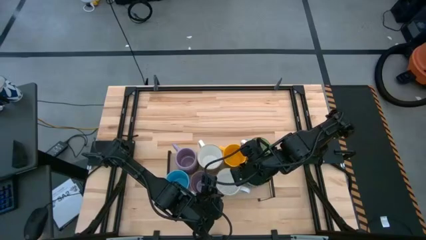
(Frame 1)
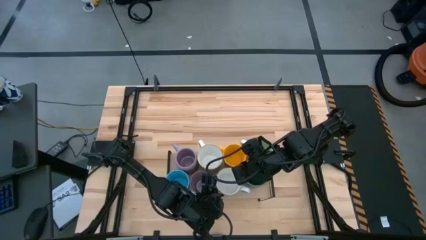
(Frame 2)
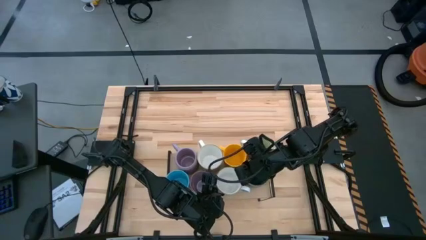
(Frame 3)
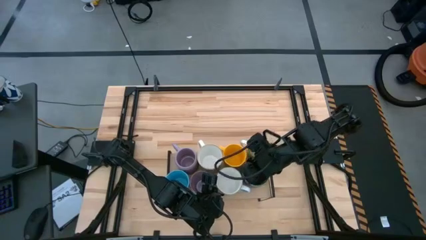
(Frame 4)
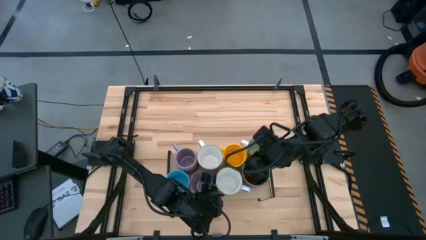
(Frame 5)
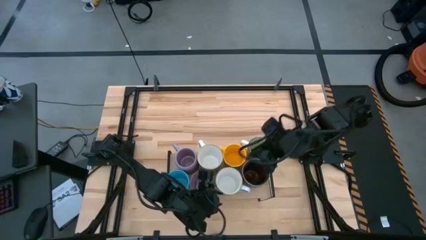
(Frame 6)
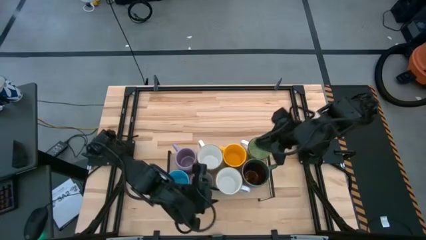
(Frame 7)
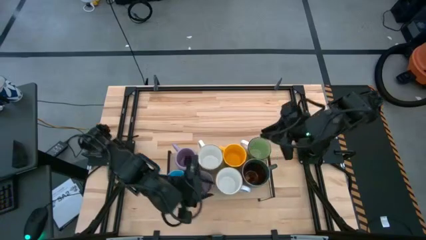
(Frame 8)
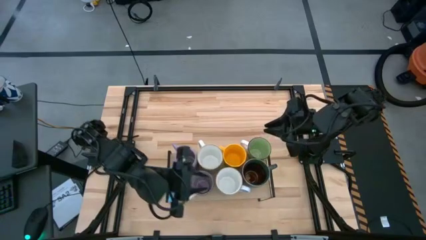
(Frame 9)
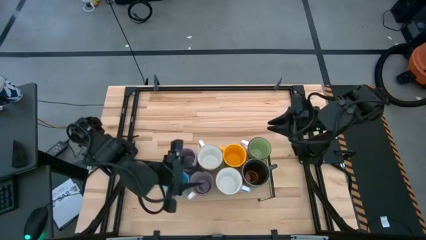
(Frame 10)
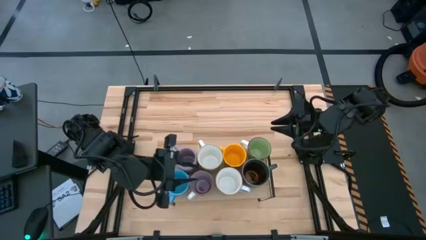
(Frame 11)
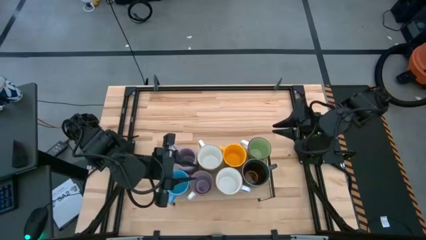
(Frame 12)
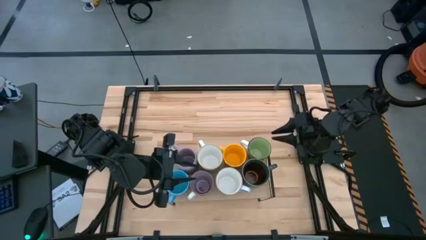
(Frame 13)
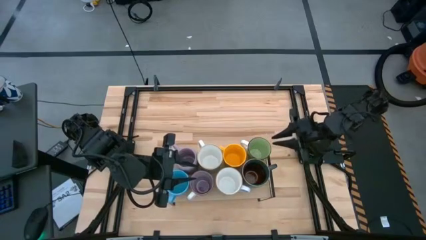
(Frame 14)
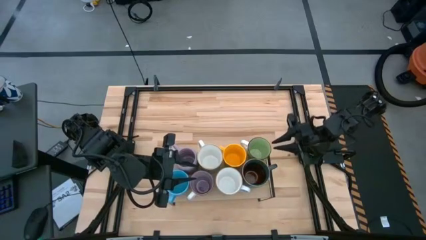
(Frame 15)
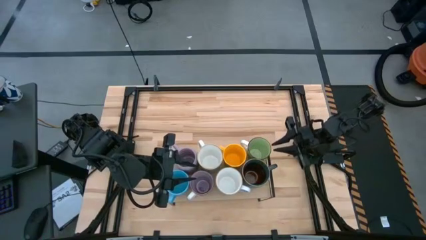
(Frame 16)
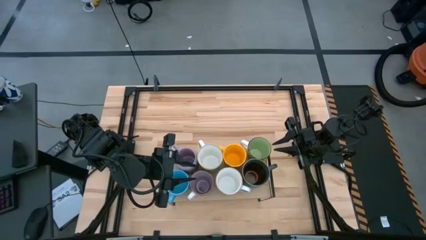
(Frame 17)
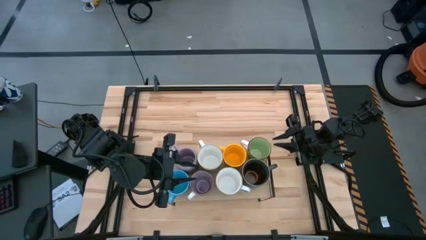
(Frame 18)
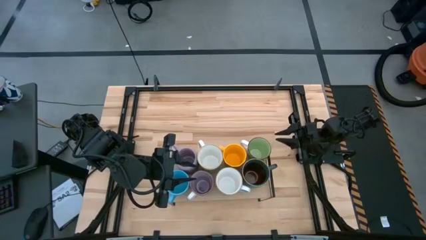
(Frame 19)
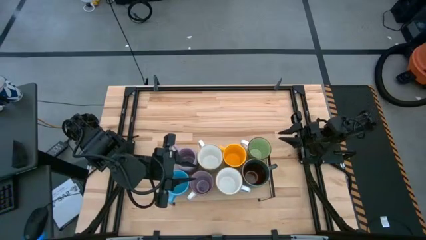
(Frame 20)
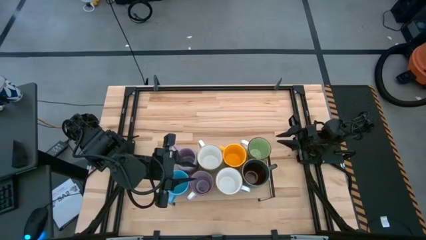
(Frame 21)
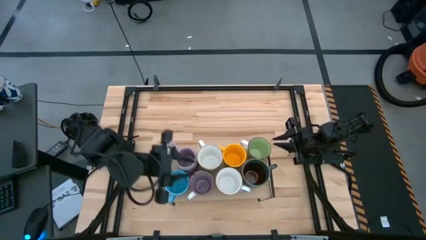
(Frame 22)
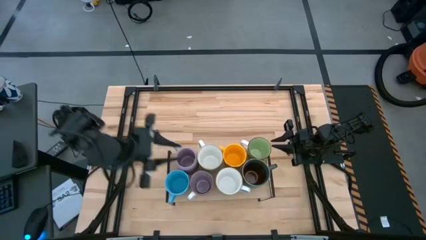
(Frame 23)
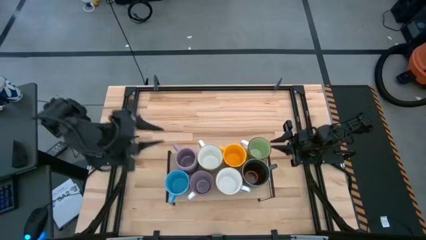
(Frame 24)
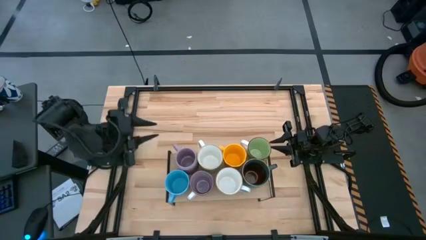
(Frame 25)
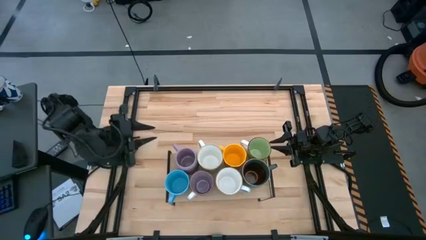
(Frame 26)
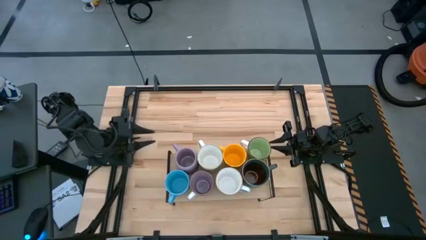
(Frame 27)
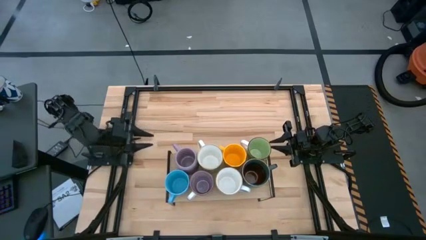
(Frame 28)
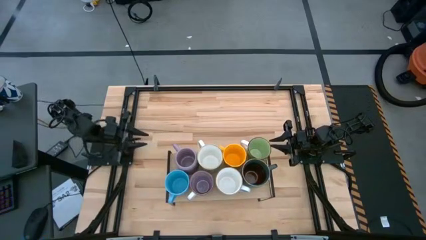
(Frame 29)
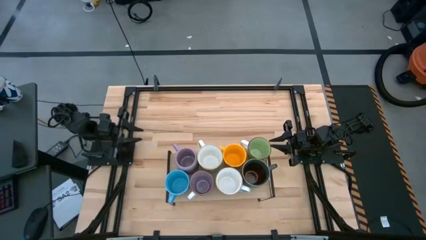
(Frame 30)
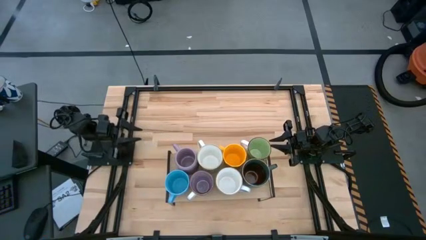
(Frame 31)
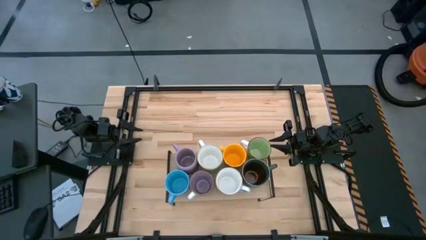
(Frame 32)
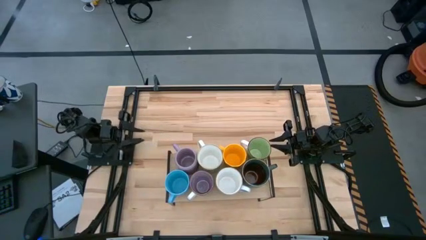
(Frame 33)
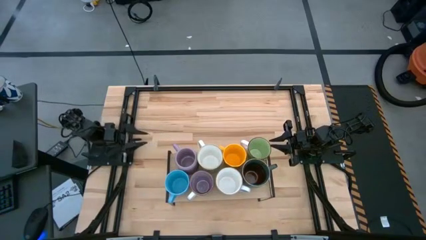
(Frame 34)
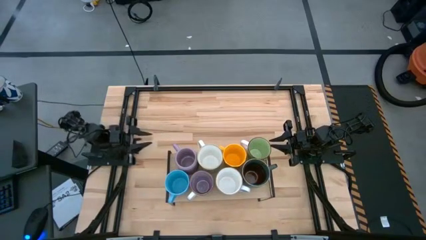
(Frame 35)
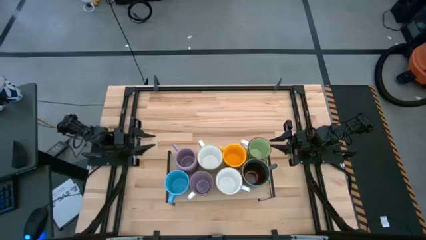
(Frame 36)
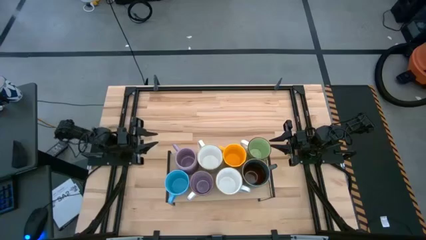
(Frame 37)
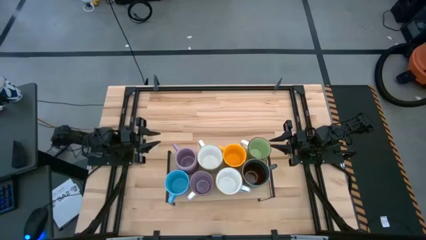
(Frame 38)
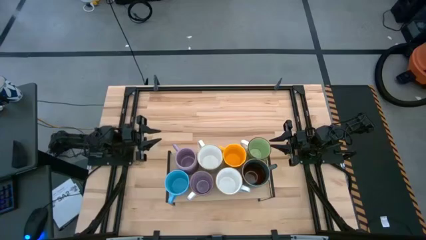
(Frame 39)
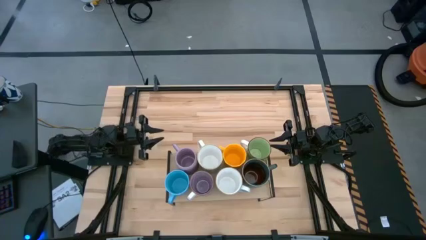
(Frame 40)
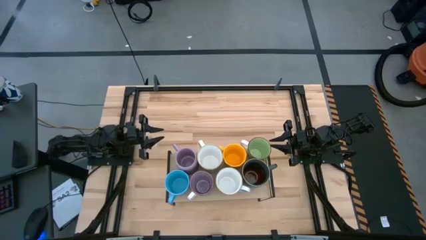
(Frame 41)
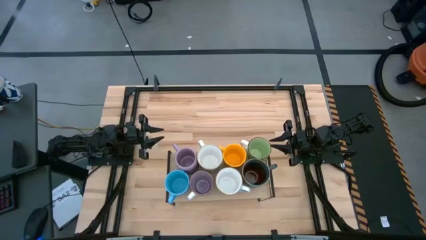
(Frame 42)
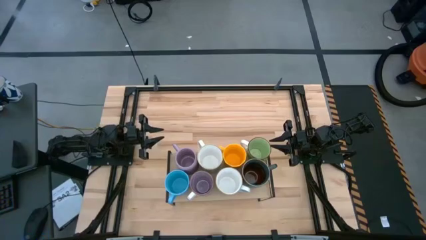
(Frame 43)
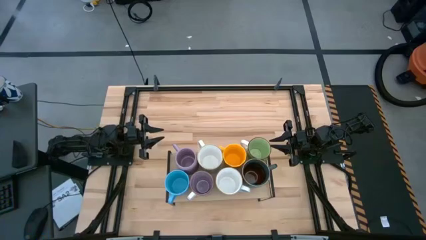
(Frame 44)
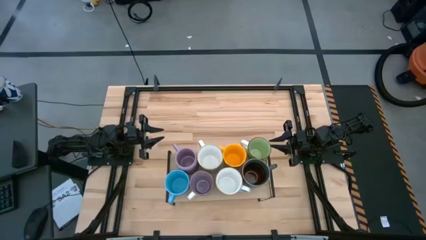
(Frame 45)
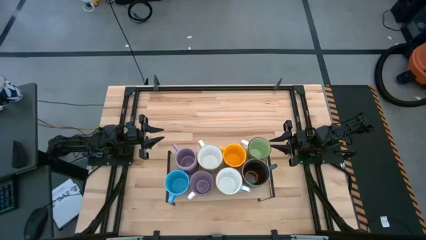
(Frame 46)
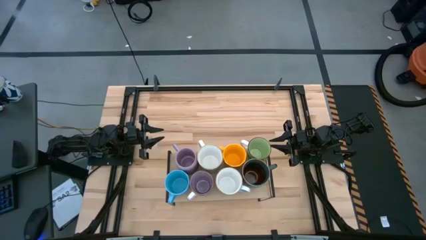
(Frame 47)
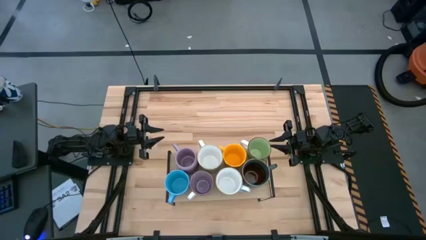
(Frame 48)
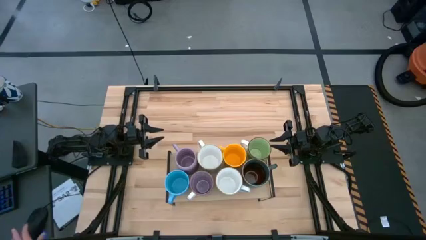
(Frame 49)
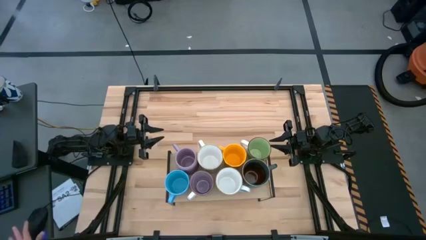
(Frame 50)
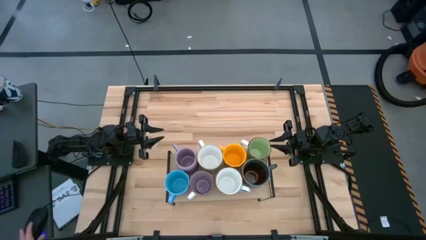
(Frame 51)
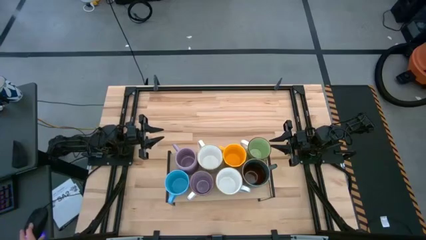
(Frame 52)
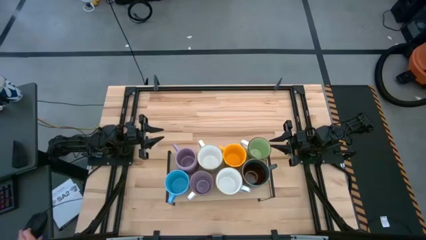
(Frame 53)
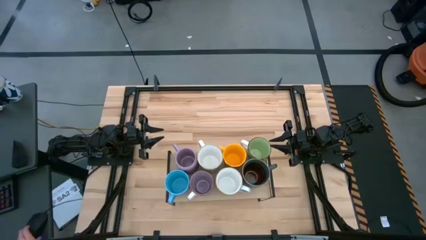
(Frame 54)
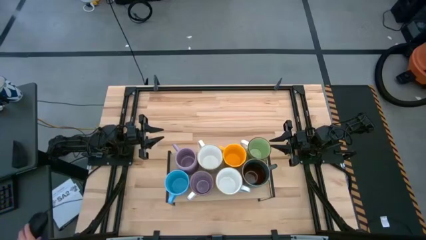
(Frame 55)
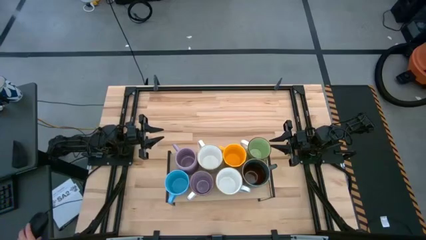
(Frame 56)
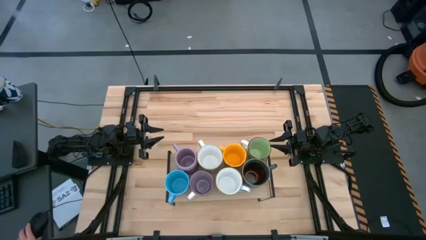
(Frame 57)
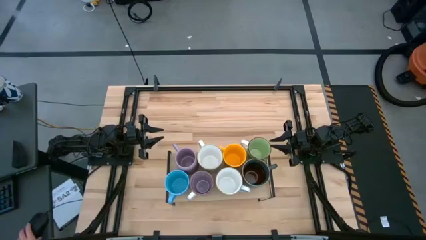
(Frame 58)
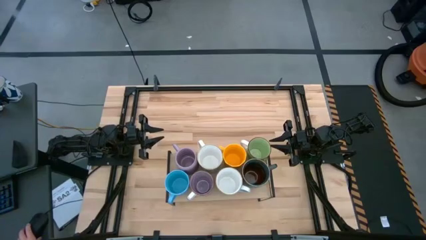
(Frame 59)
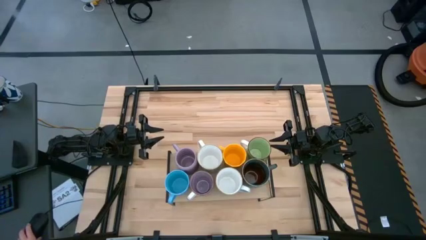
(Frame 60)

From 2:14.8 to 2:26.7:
Task: Place coffee mugs
Return to Home Position

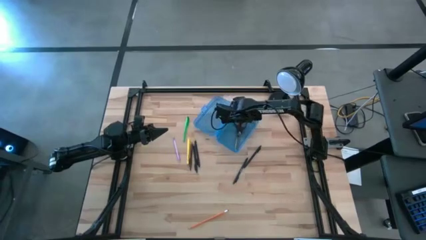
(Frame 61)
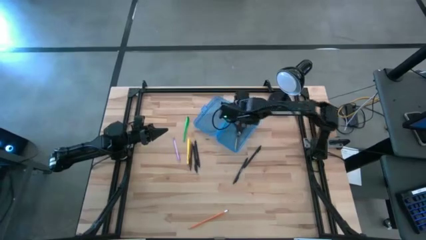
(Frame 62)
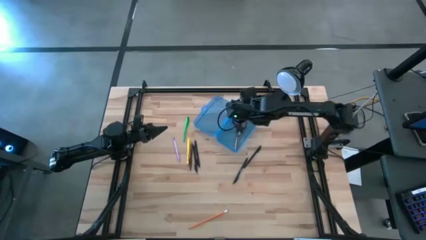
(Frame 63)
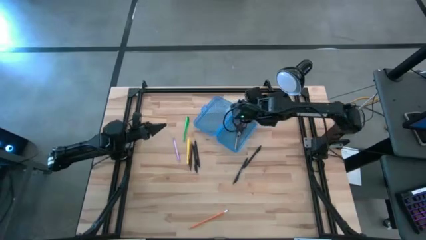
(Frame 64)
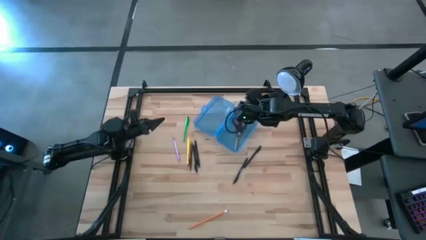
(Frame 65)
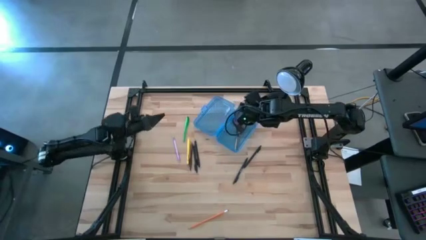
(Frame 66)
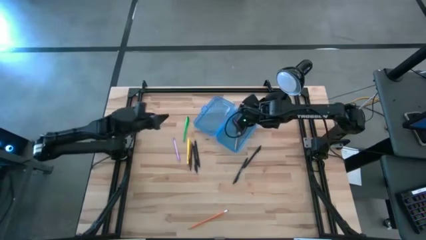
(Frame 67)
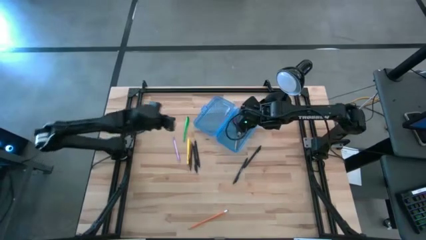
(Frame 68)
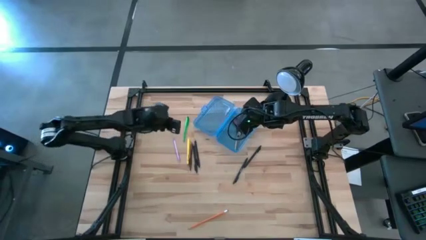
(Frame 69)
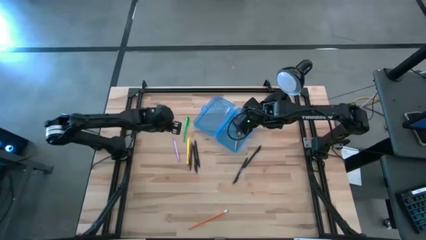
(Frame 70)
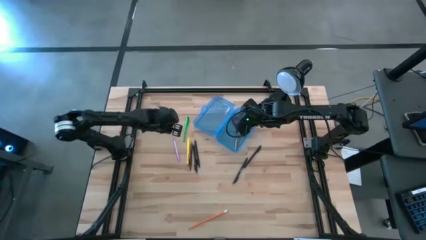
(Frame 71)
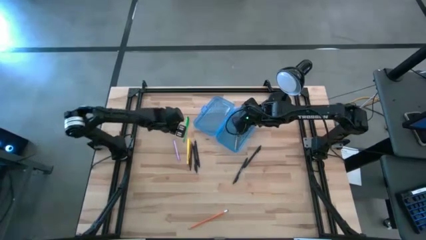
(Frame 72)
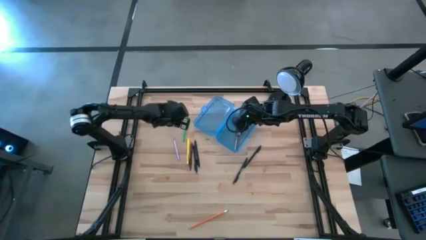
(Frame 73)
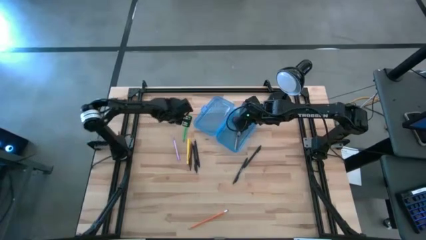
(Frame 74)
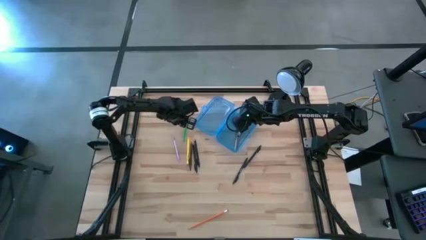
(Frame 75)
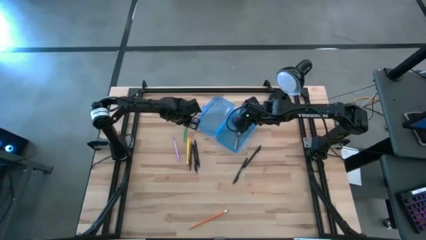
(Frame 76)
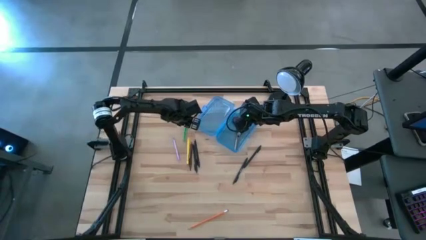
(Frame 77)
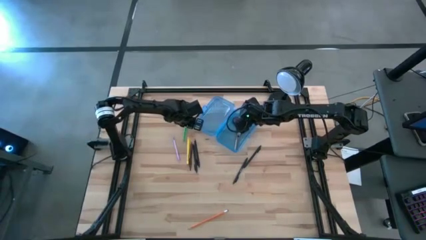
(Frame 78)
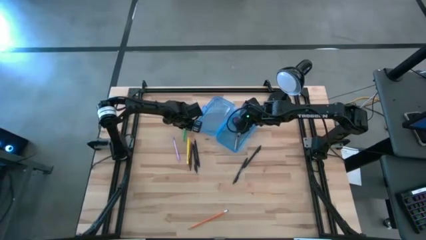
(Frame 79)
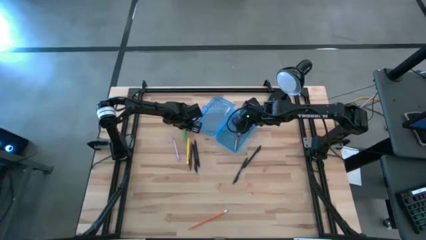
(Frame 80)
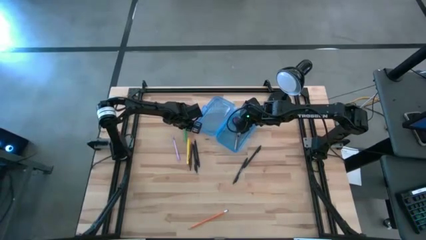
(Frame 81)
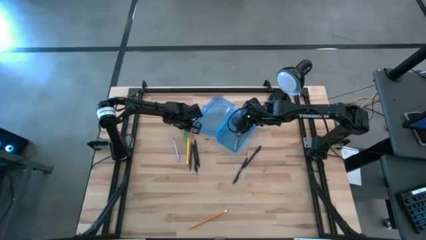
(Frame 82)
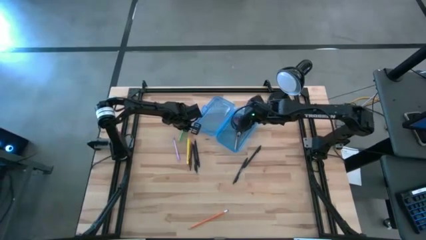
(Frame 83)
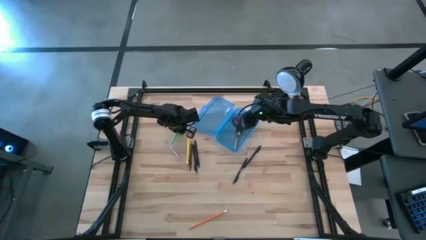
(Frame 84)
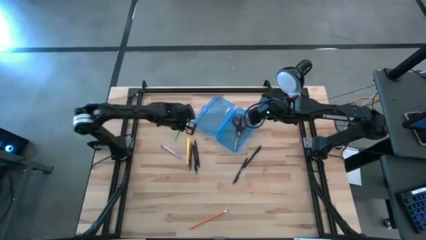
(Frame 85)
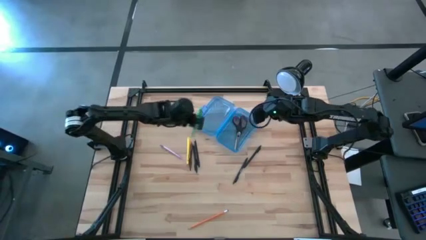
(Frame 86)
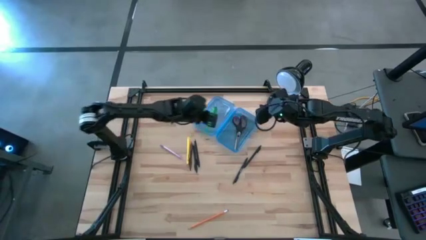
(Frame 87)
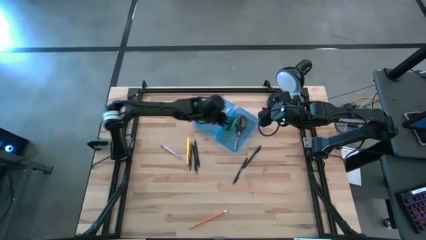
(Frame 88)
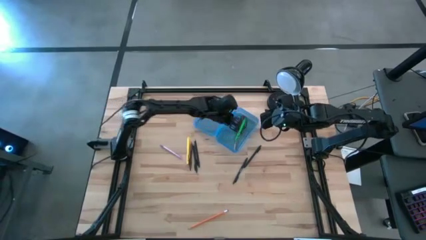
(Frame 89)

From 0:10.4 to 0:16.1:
Task: Pick & place school supplies into a supply box
Put the green pen into the blue supply box
